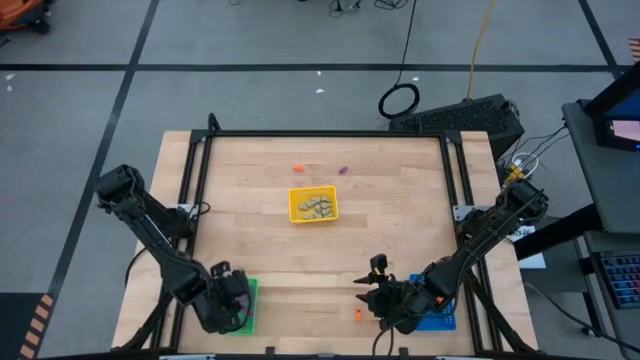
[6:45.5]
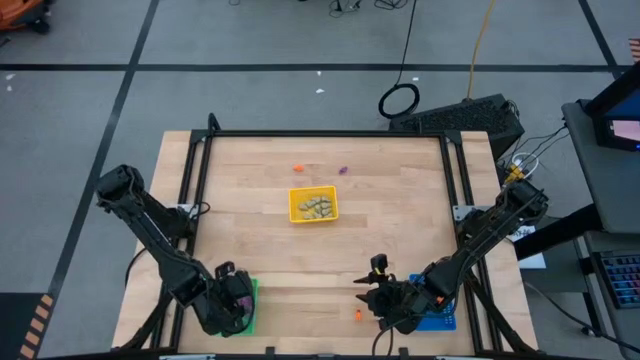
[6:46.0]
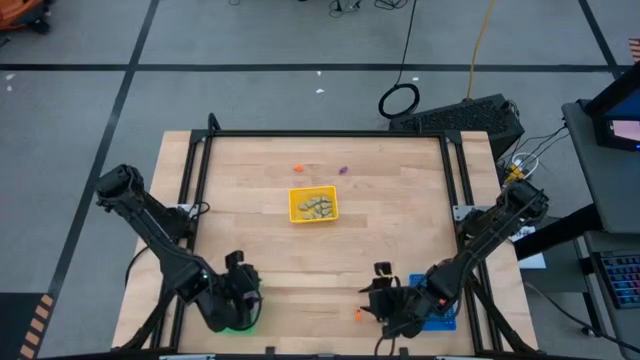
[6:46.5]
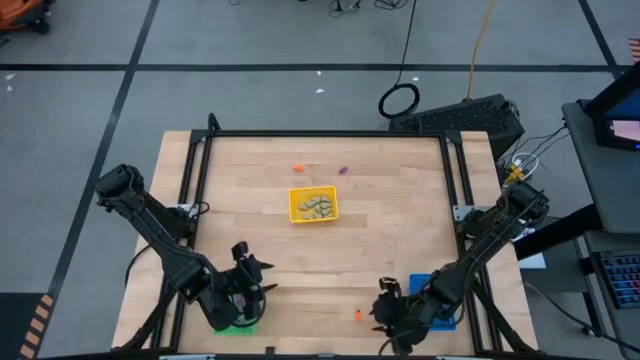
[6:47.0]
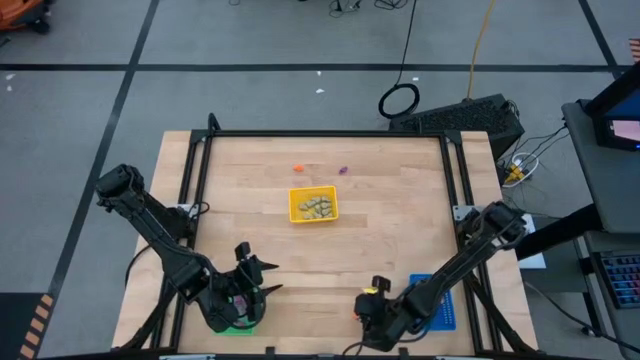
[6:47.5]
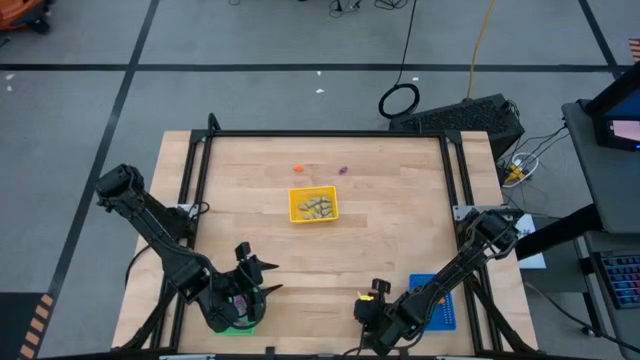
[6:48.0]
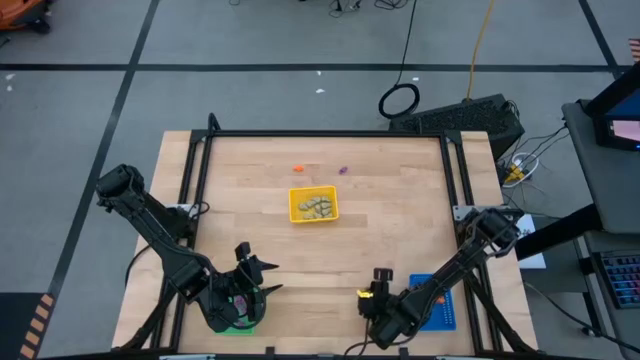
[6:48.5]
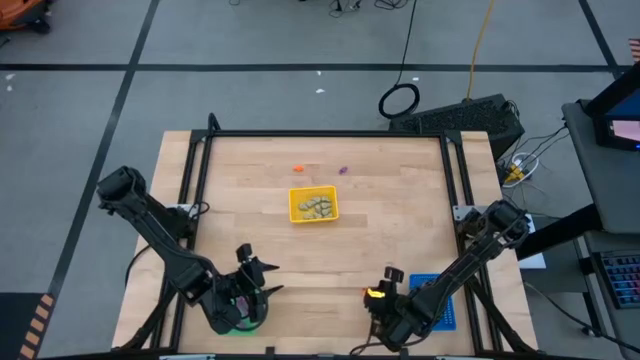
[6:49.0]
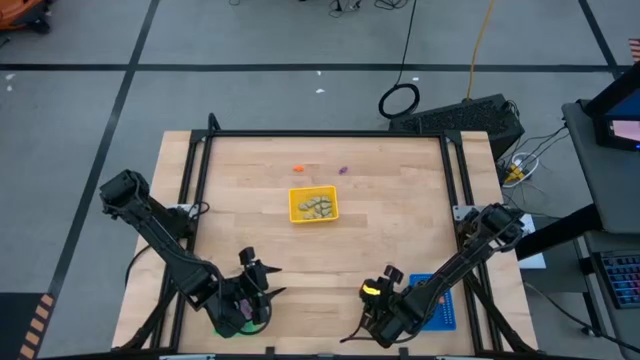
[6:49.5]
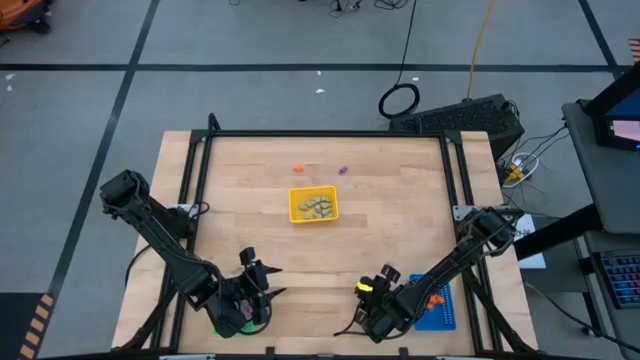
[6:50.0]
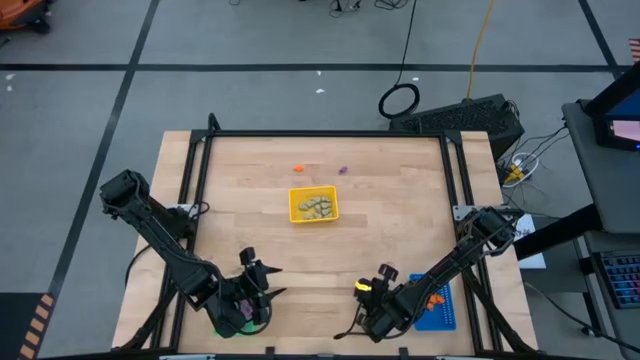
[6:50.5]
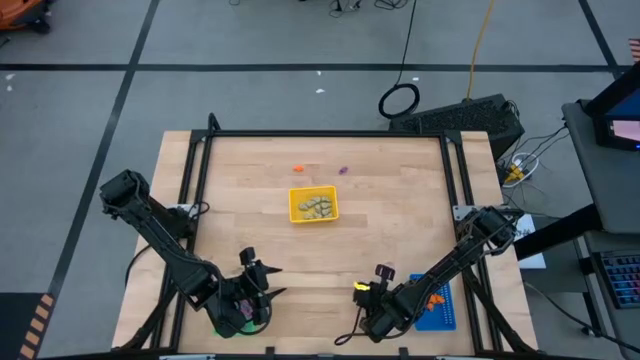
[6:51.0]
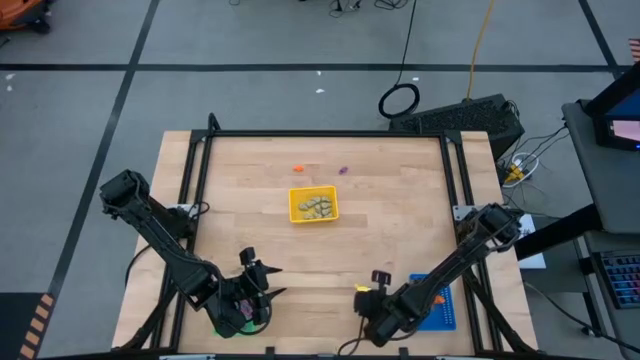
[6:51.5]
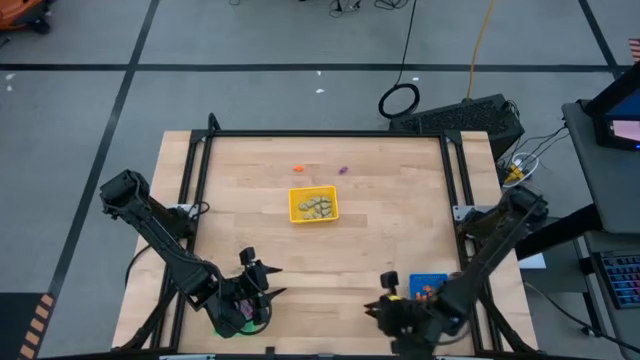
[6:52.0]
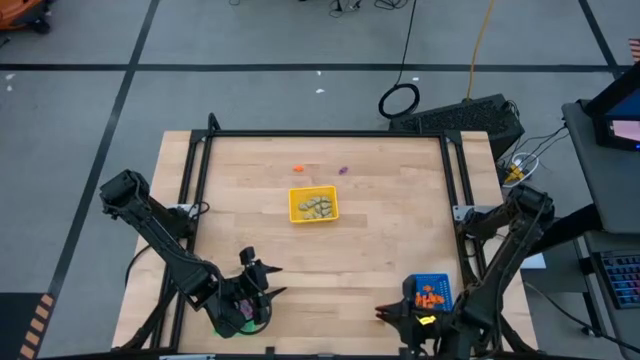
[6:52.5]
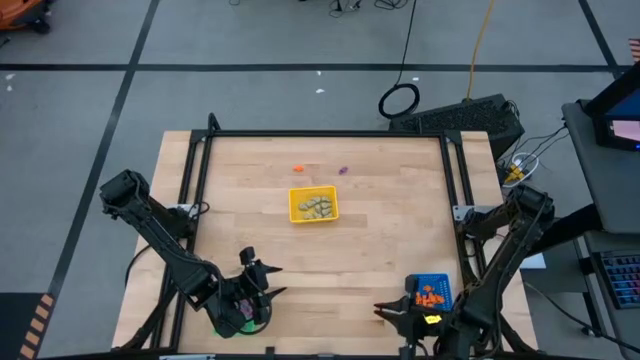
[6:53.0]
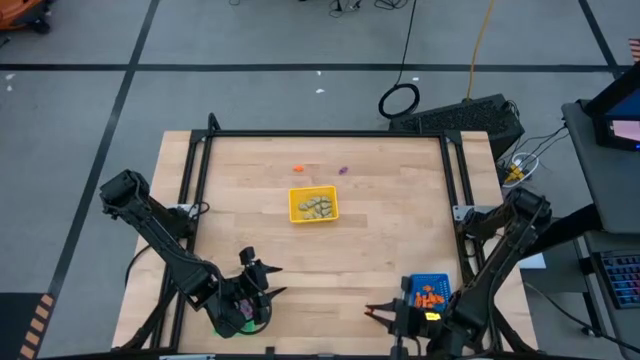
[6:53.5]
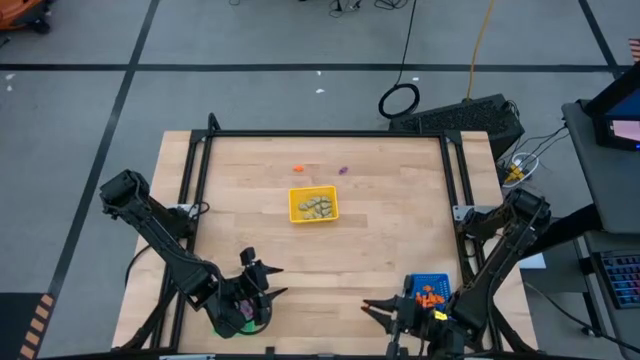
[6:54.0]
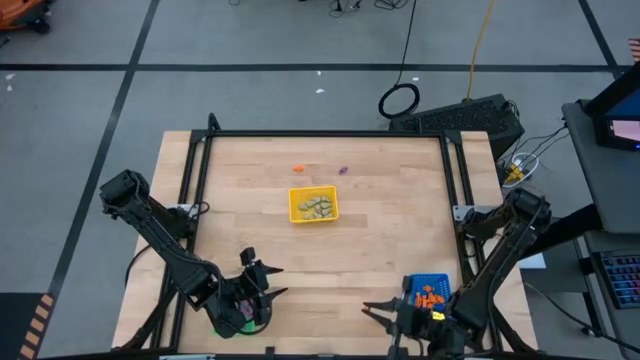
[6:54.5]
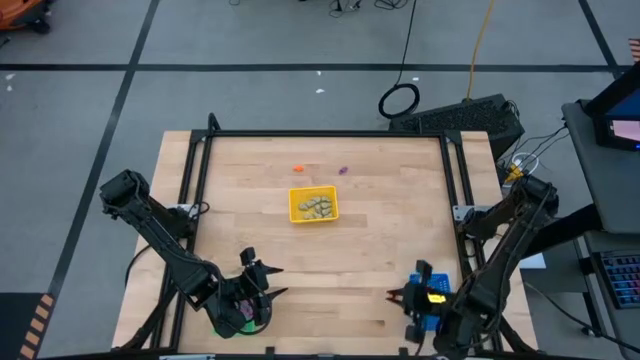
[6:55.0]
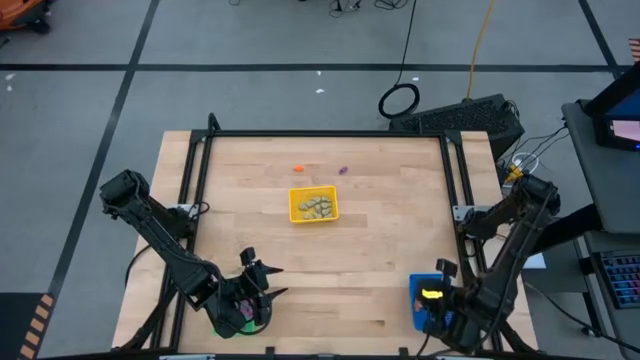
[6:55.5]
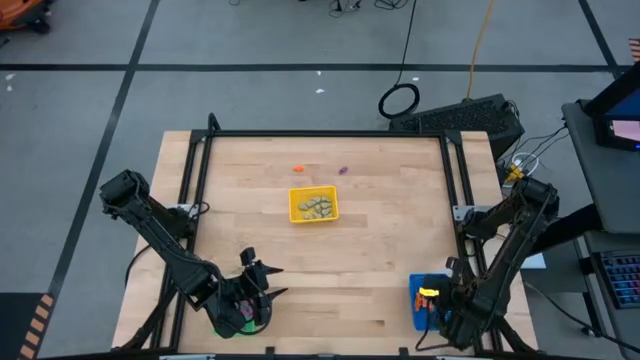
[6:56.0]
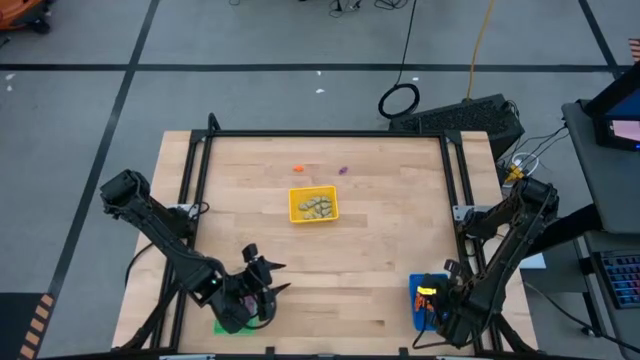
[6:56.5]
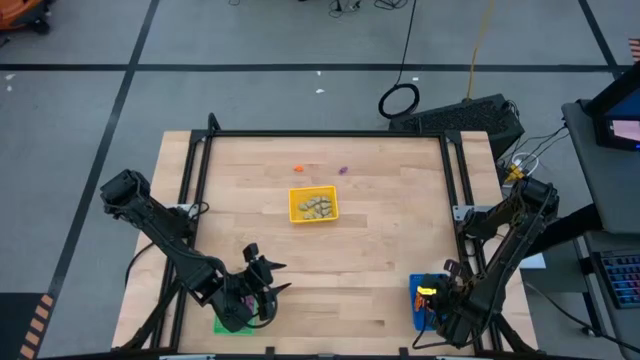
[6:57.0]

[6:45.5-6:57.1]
Task: Sort Halloween decoration
Put the orange skeleton toy in the blue basket

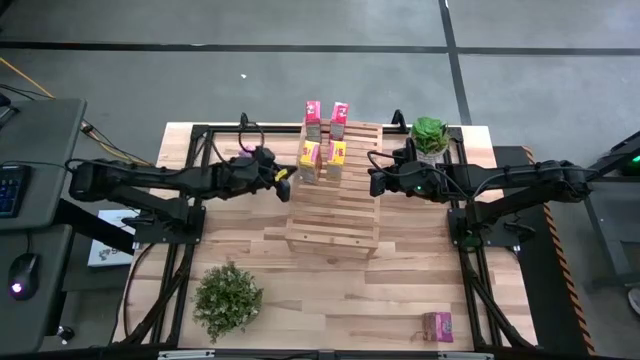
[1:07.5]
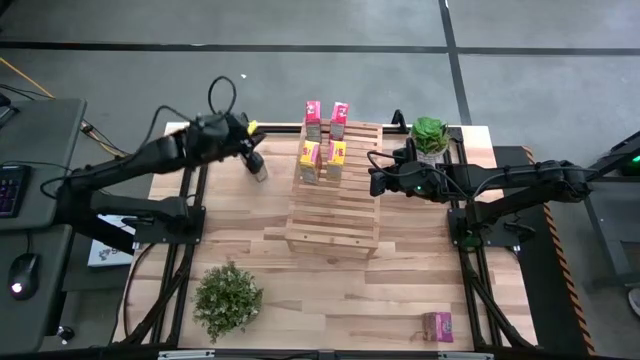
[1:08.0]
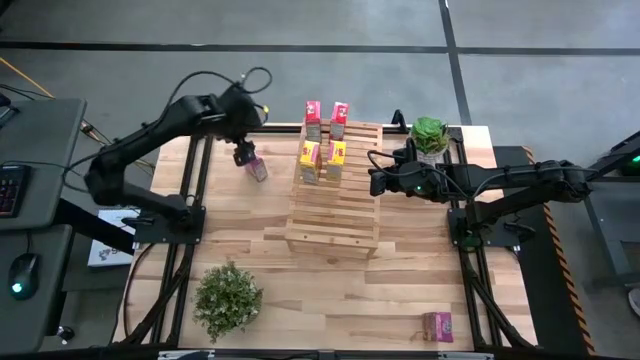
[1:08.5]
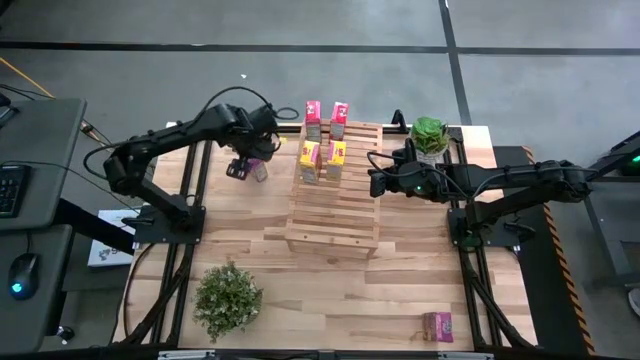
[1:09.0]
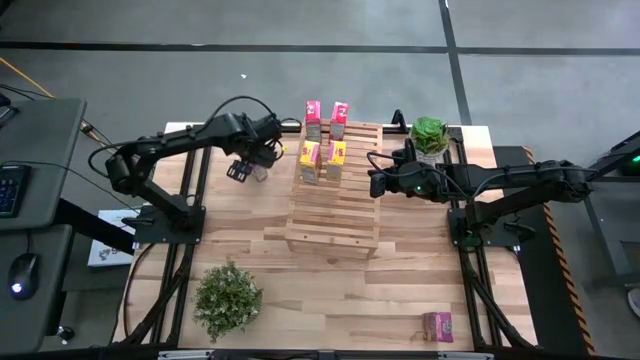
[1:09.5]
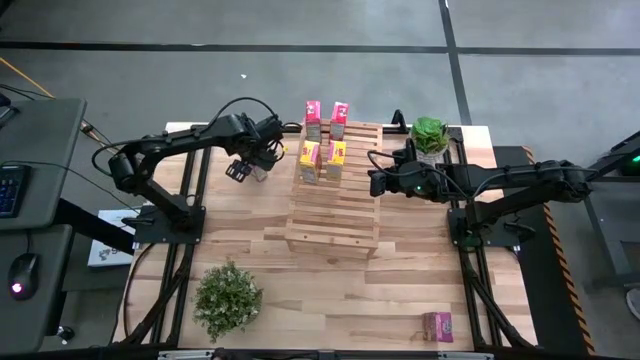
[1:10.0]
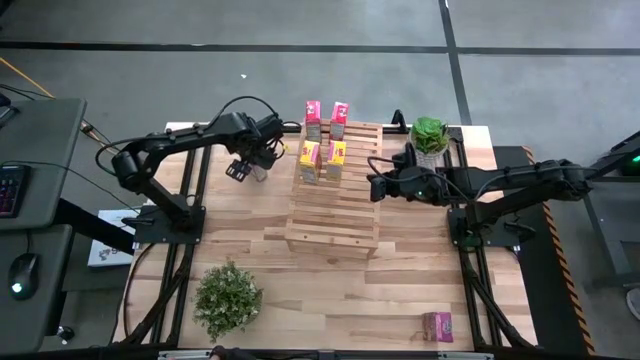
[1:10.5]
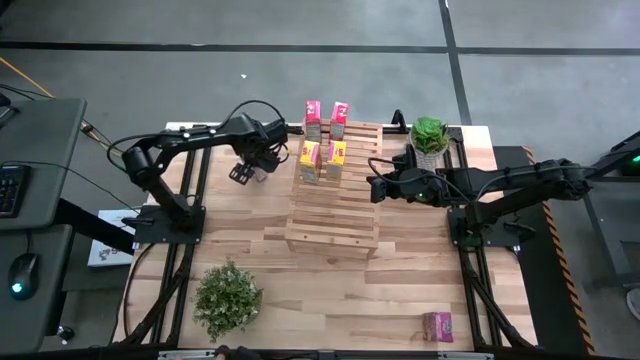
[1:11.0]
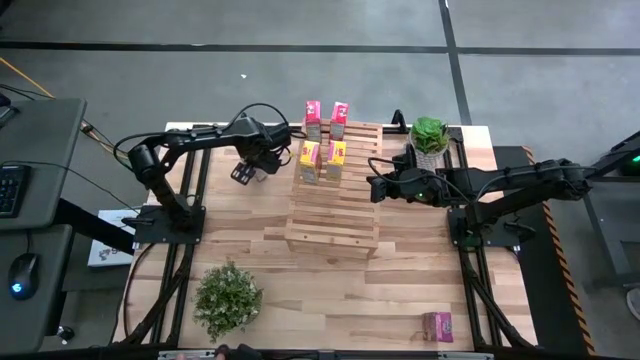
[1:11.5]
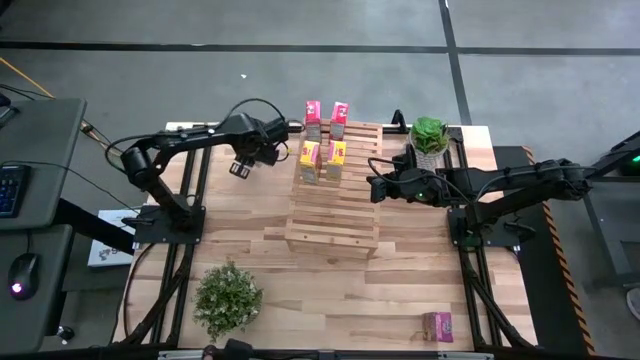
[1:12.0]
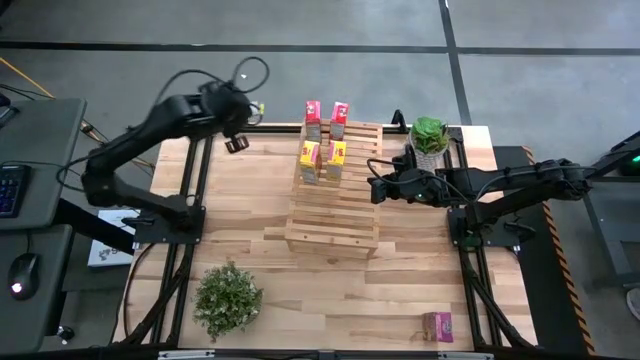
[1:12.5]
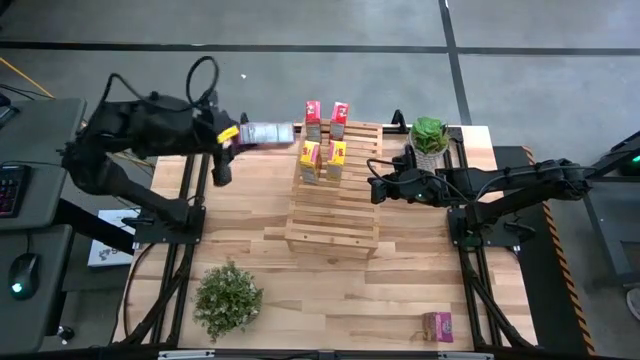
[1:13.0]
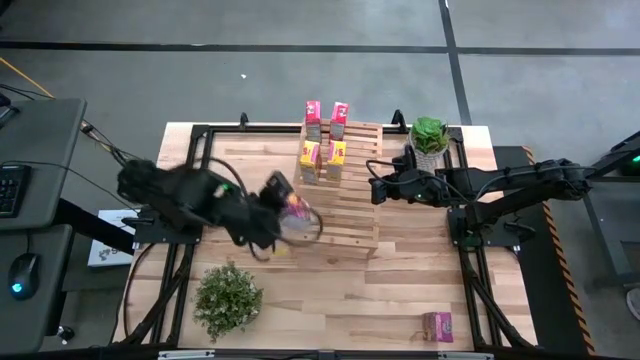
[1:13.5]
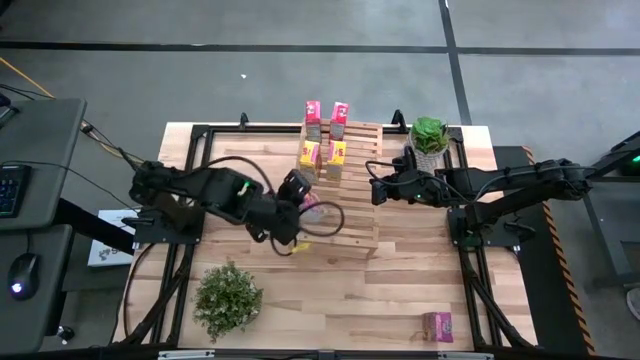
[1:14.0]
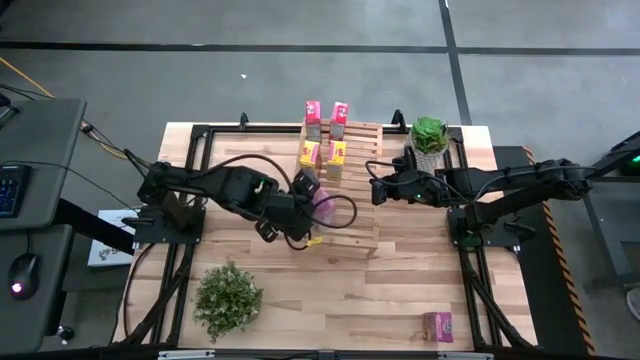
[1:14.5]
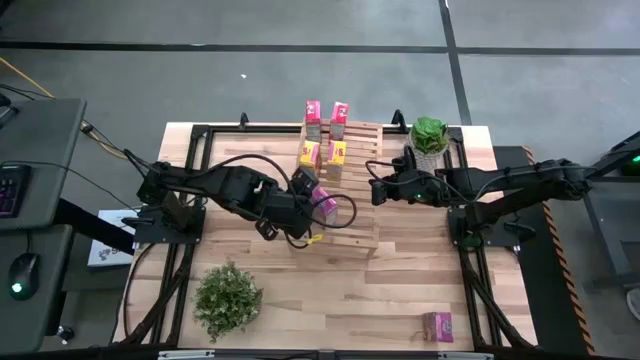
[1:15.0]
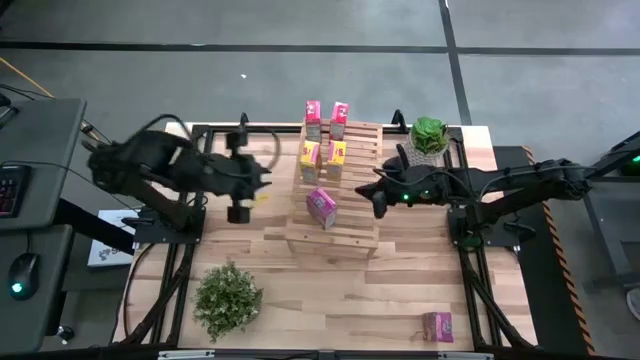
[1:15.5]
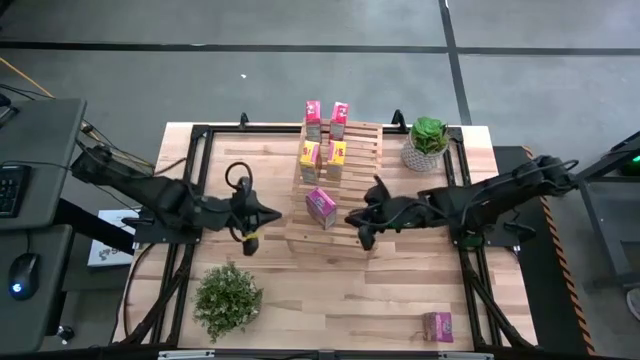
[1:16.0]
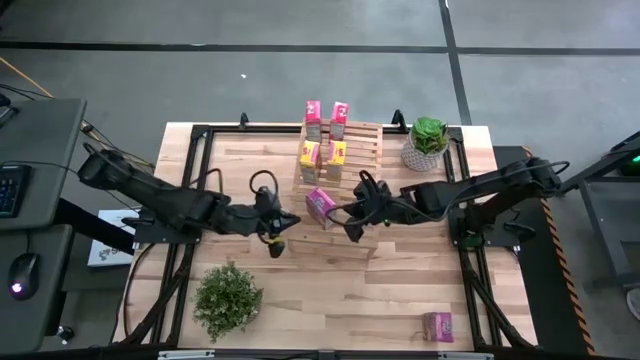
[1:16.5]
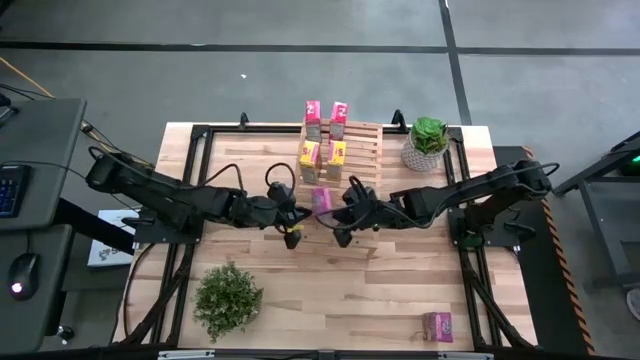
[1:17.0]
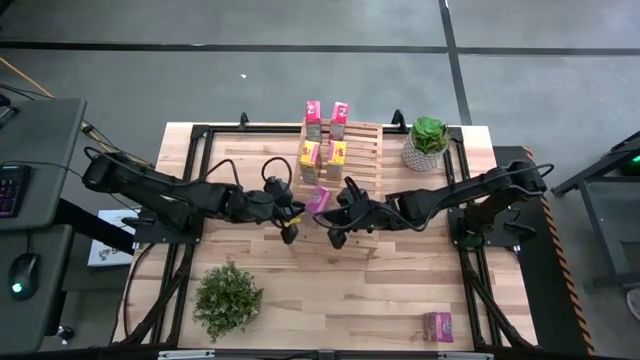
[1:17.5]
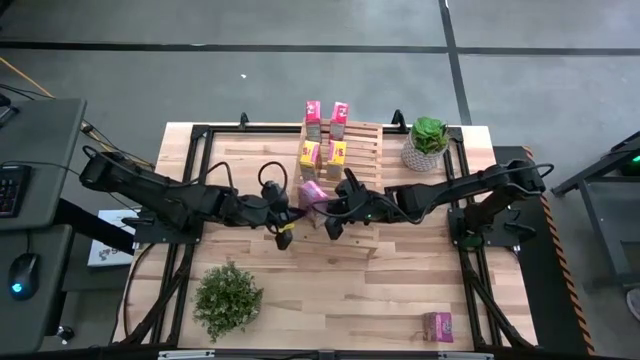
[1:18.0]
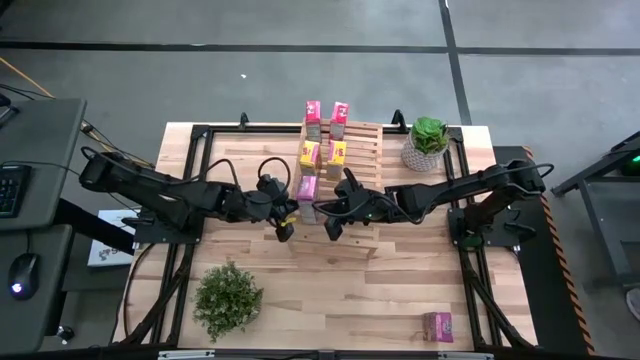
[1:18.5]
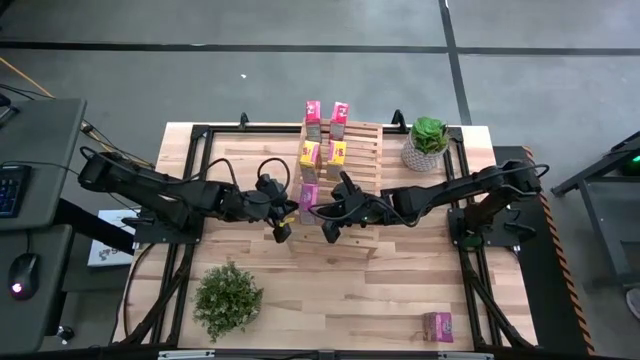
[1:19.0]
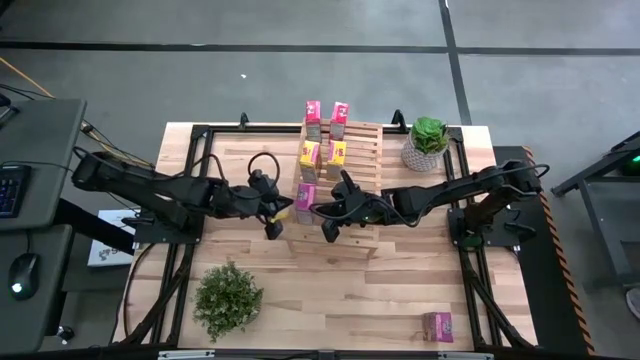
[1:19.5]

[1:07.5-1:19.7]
Task: Stack cereal on shelf
Put the top purple cereal box on the shelf
